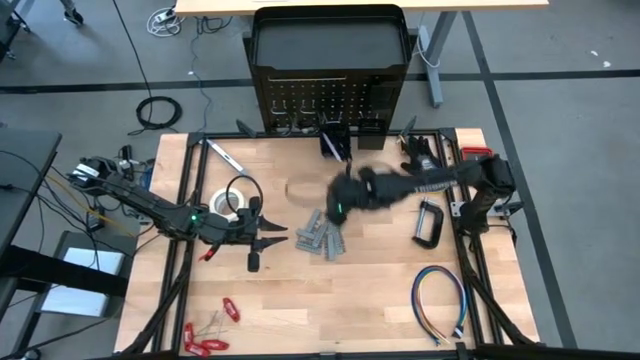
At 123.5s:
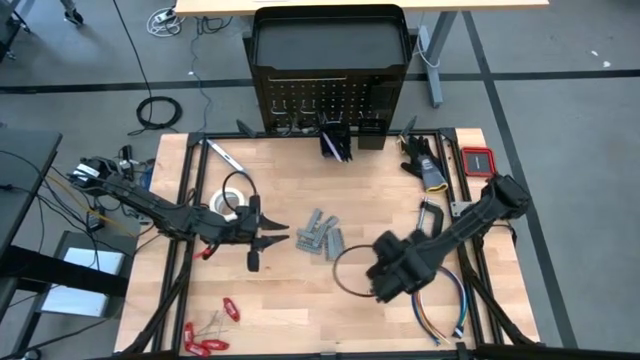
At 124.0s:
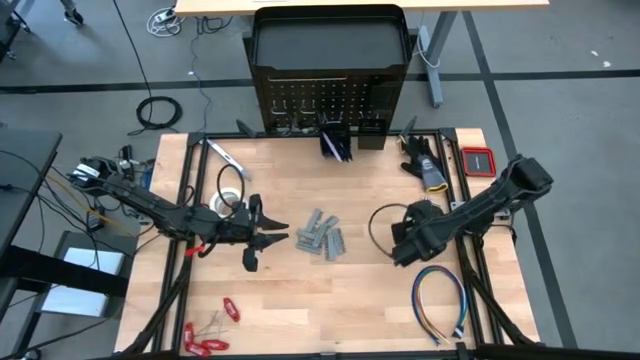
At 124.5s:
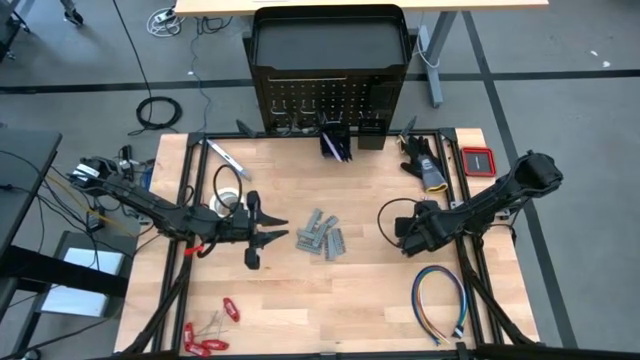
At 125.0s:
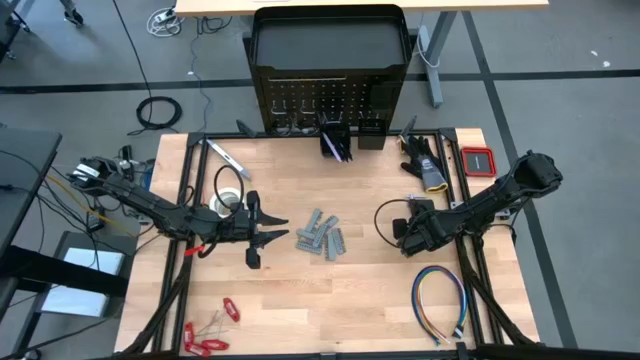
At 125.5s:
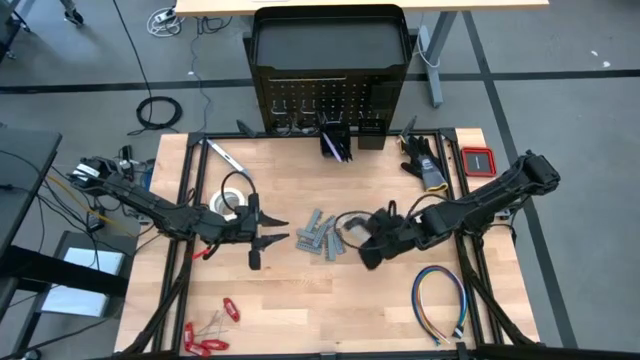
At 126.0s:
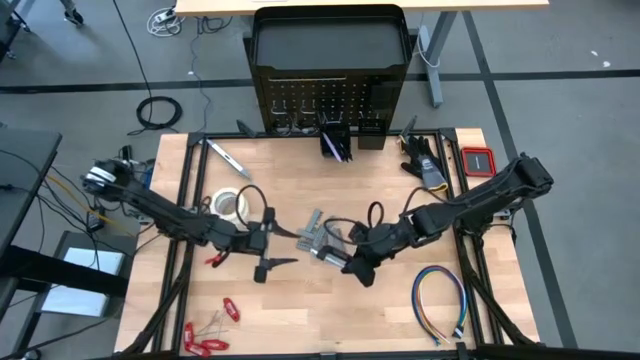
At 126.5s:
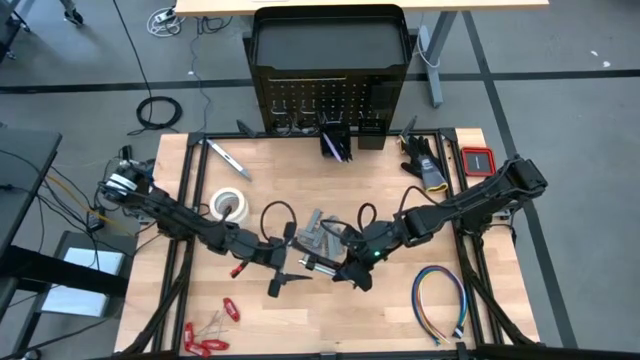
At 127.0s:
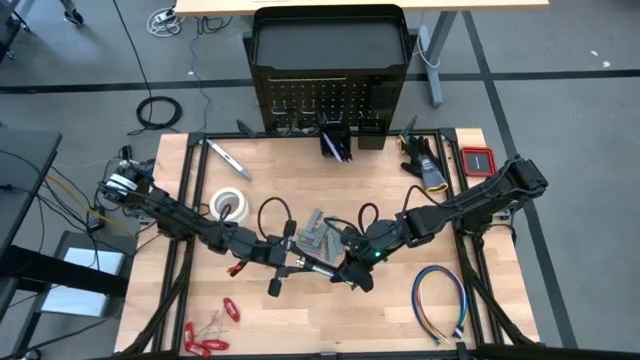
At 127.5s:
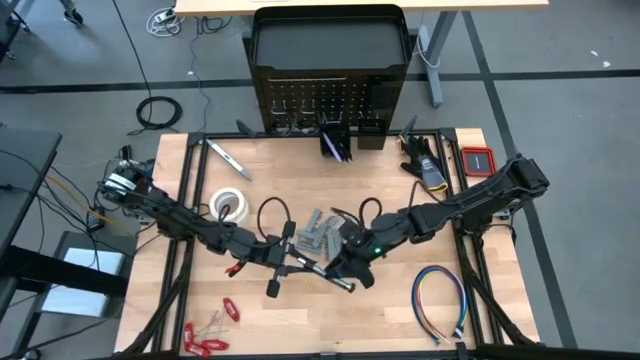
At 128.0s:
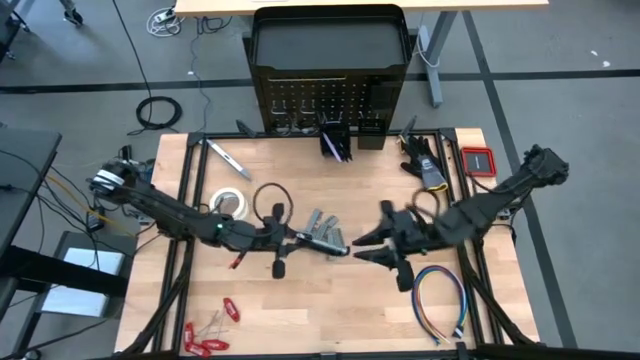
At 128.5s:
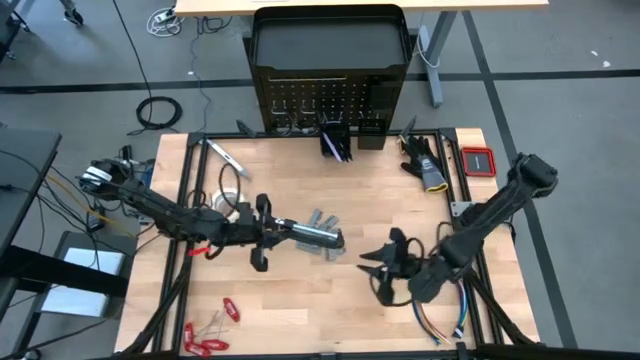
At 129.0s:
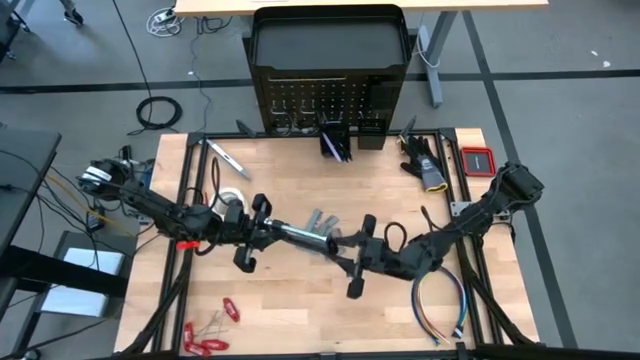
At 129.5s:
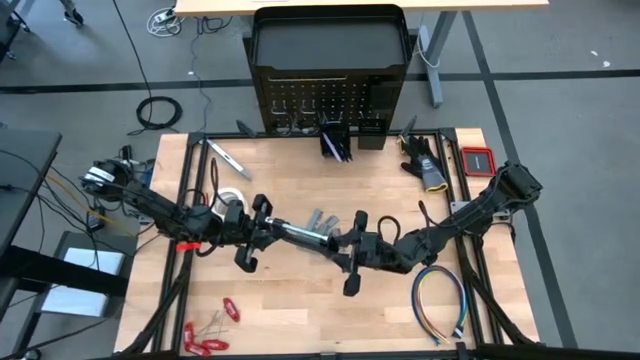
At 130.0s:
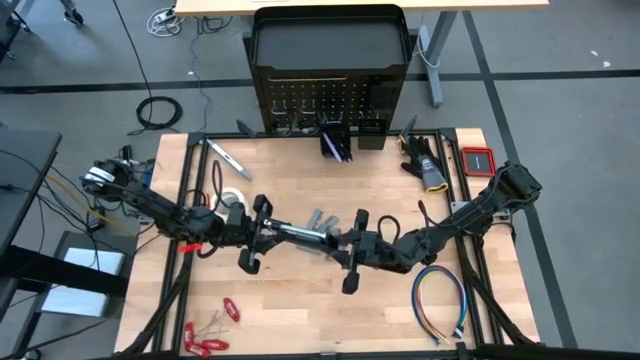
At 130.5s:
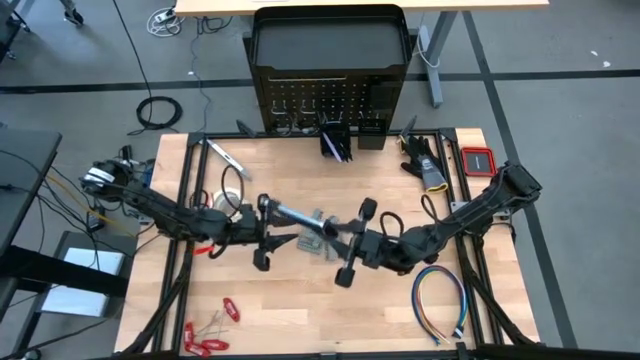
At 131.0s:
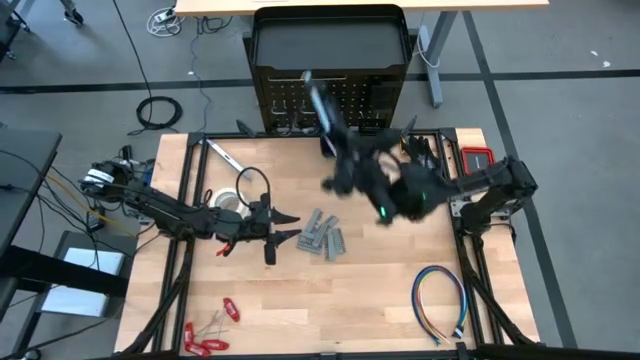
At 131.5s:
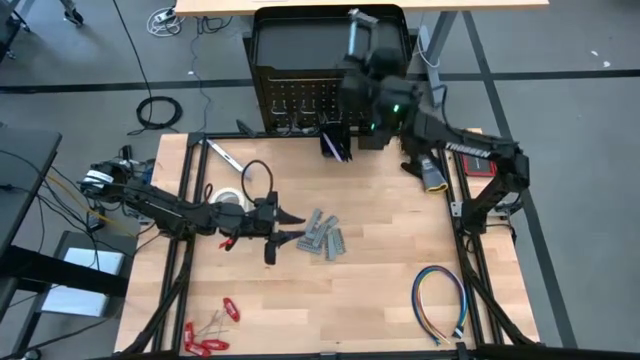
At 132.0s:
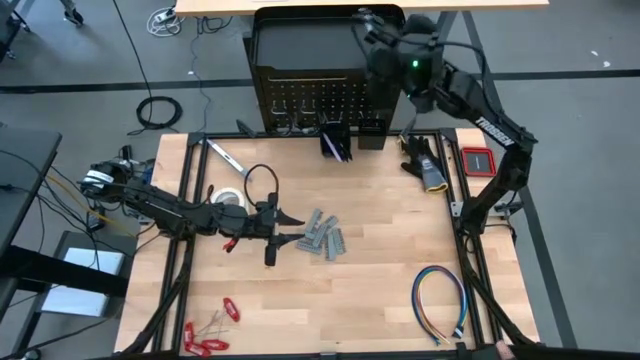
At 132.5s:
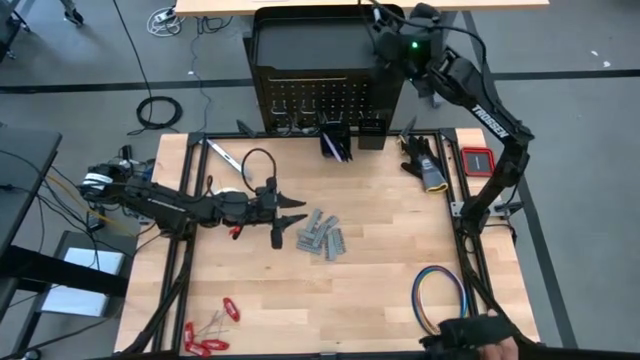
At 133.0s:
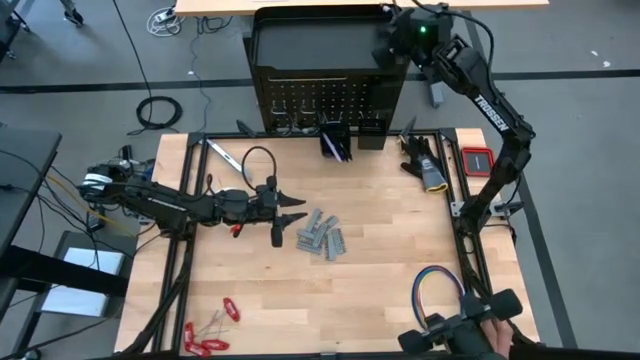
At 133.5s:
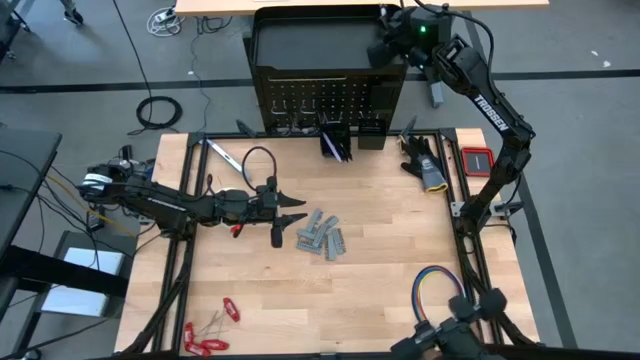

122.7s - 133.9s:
Task: Hang tools onto peg board
Put the black clamp onto the peg board

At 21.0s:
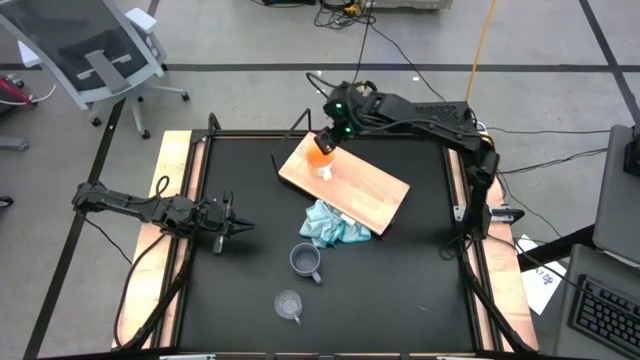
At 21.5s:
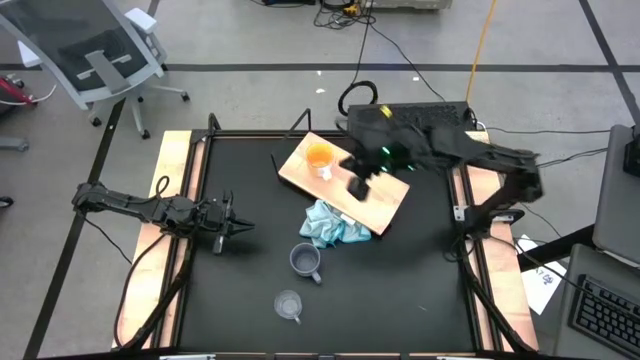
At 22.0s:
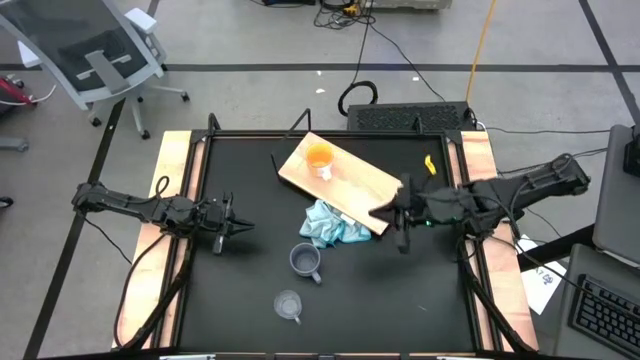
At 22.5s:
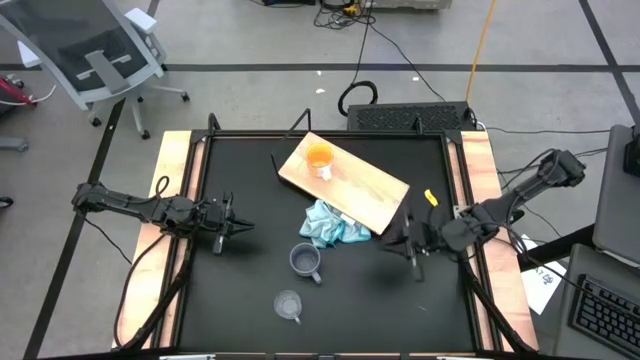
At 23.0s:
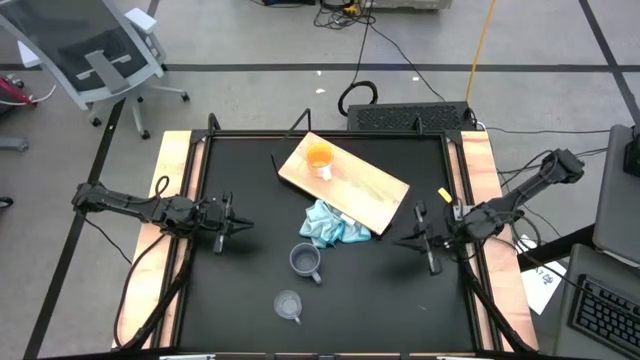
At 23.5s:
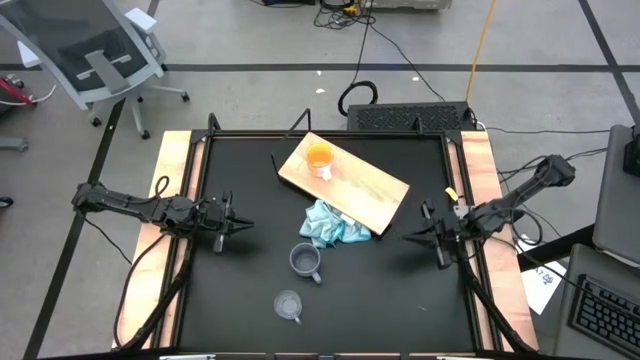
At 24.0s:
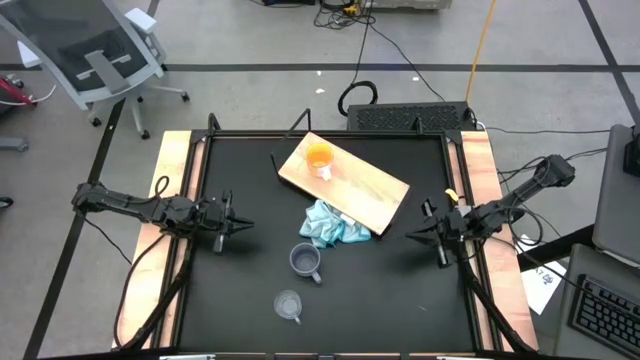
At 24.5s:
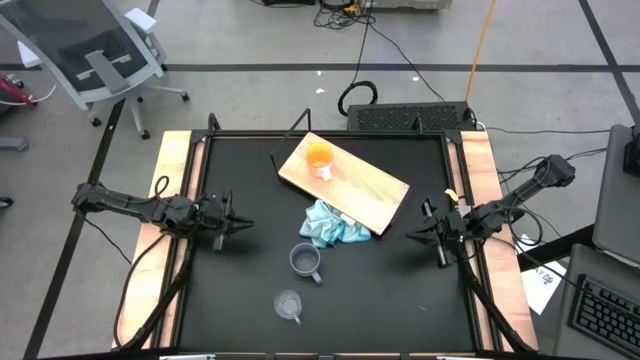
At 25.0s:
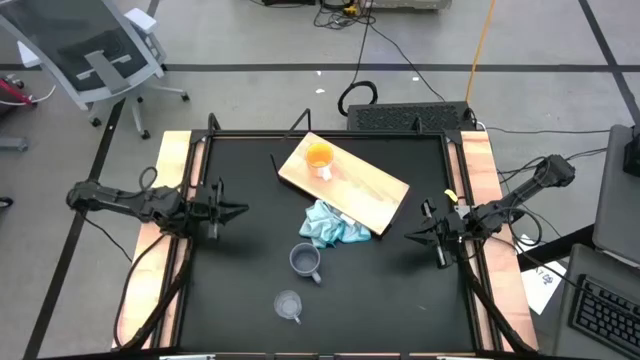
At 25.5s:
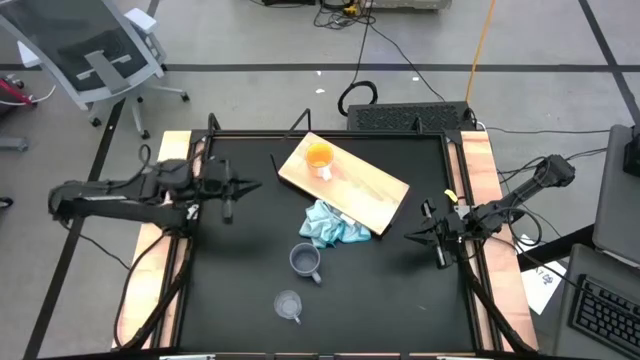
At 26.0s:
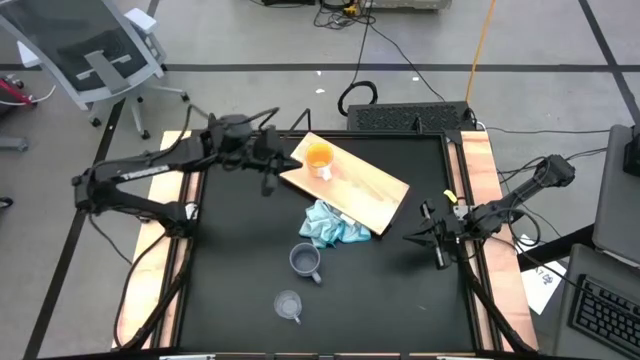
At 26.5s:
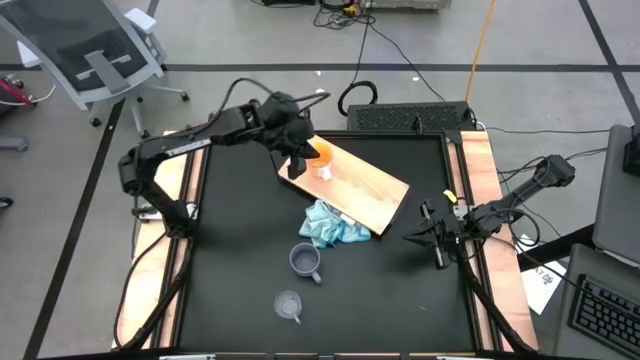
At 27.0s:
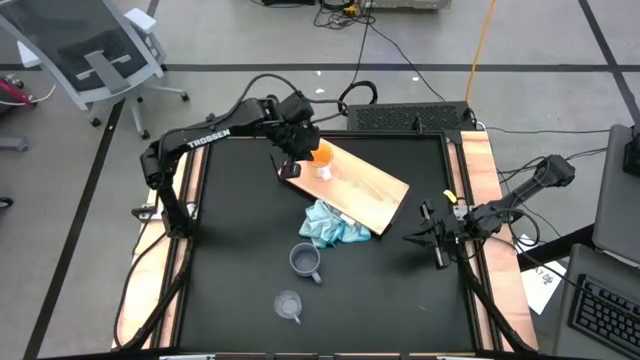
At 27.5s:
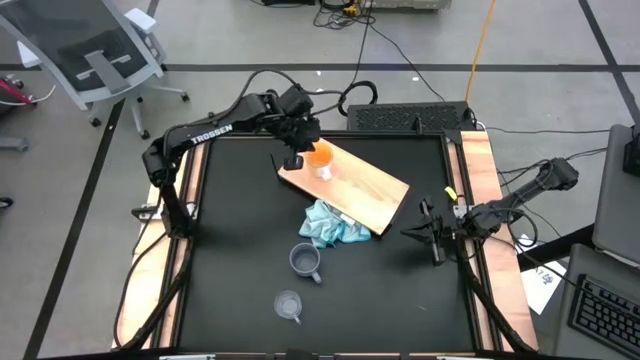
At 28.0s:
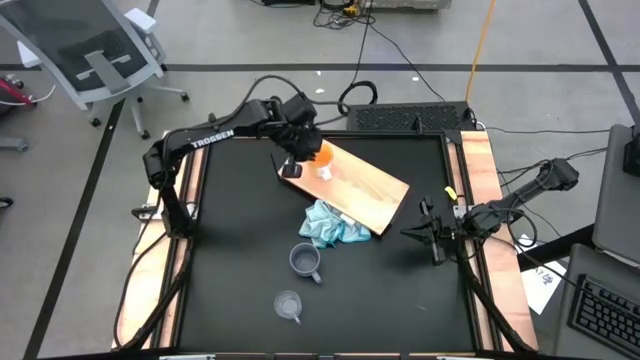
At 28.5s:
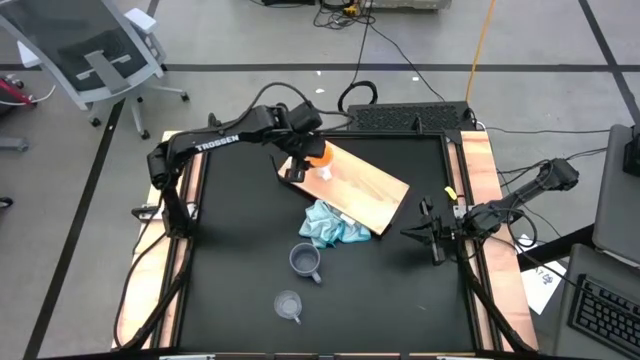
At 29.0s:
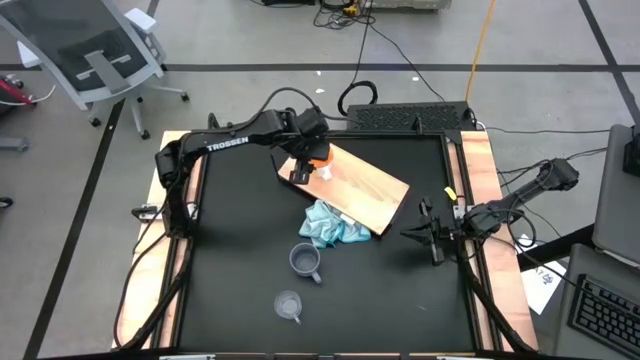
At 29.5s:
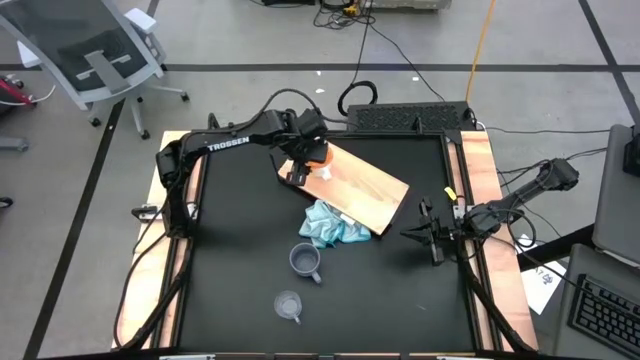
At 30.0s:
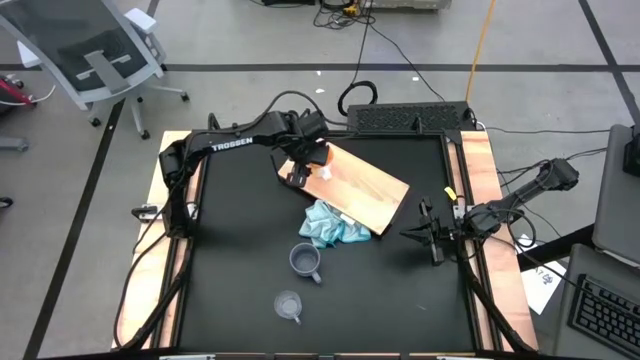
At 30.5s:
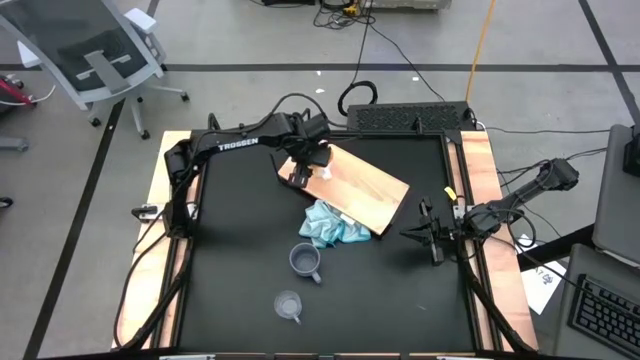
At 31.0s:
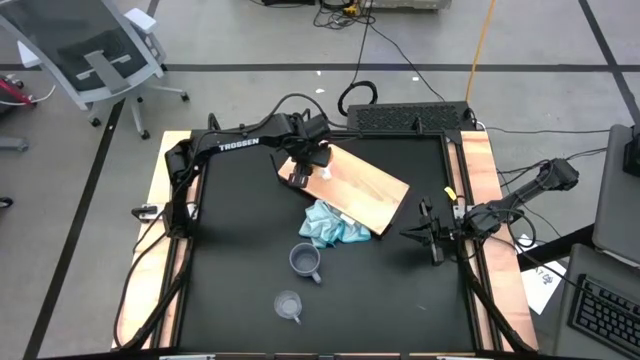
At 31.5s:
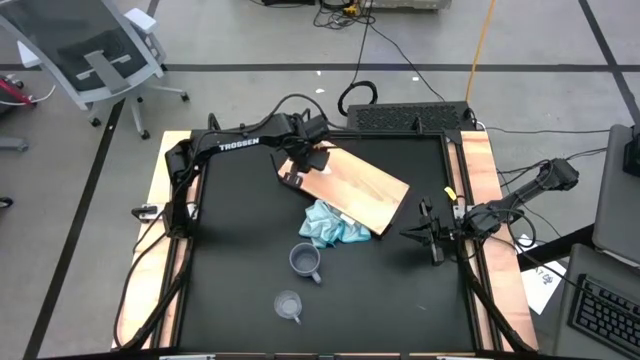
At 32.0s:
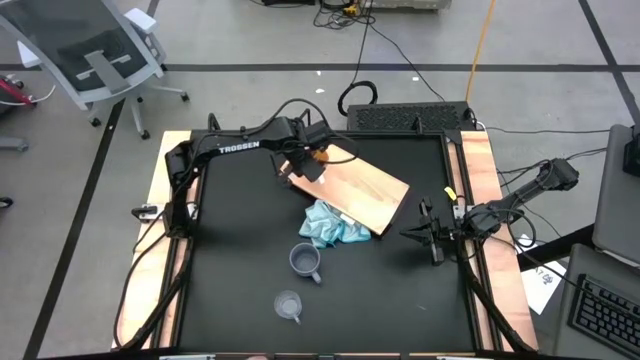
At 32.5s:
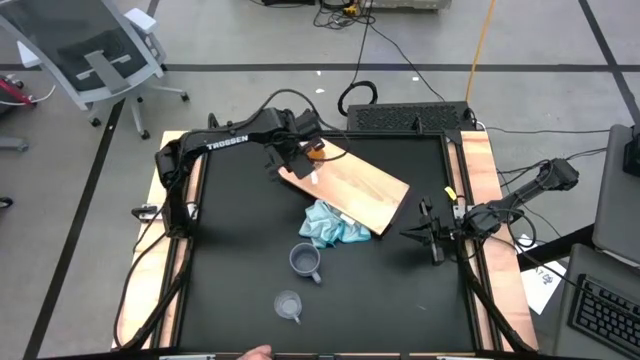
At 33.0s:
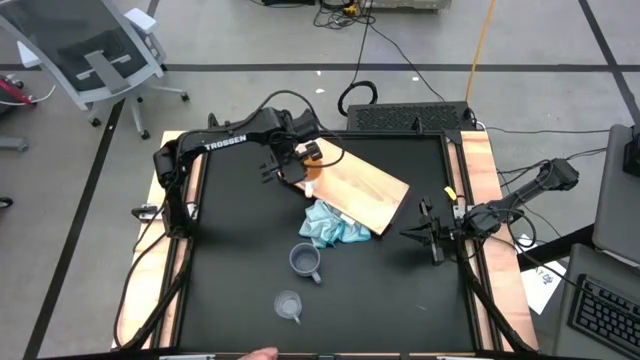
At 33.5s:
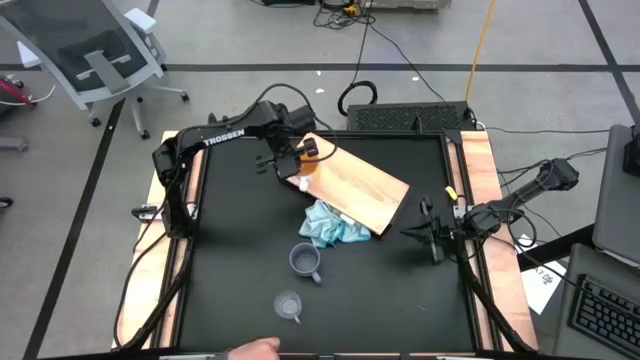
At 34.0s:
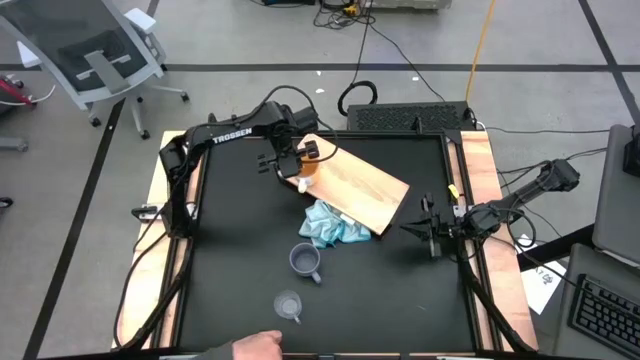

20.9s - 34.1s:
Task: Stack small to large cups/mugs on shelf
Adjust the position of the orange mug
